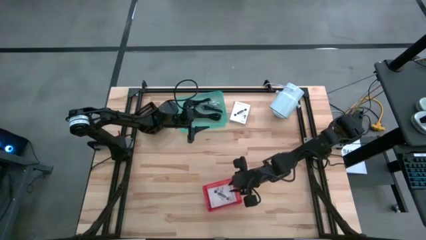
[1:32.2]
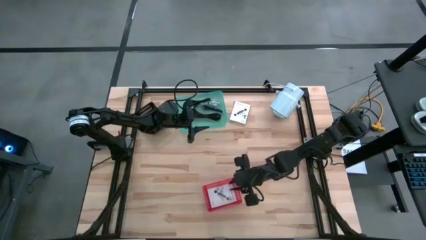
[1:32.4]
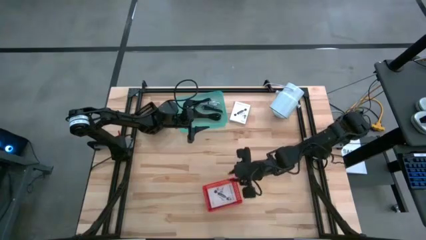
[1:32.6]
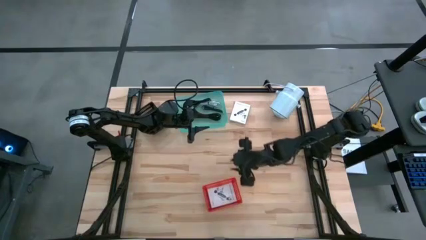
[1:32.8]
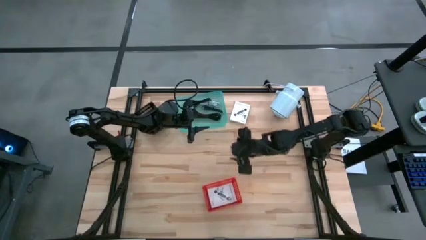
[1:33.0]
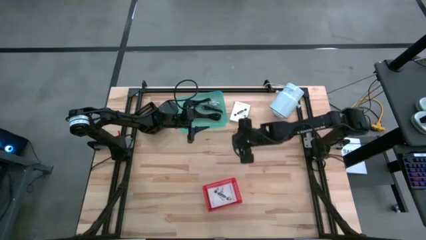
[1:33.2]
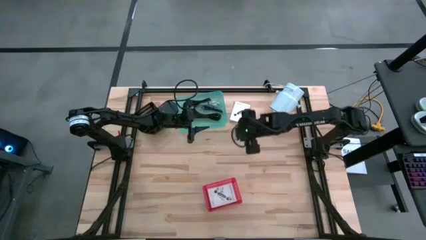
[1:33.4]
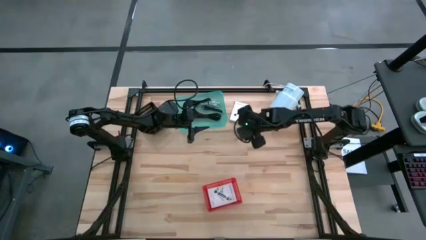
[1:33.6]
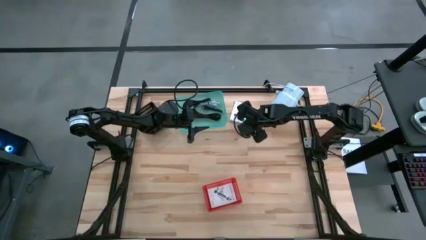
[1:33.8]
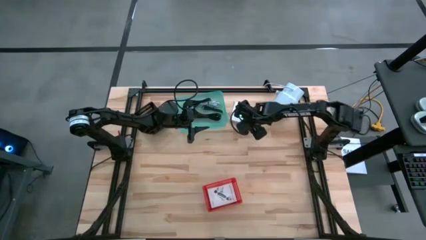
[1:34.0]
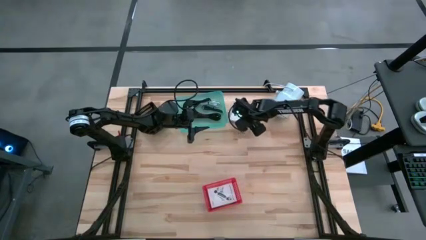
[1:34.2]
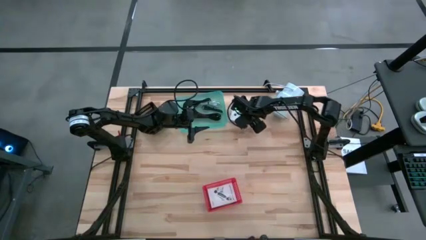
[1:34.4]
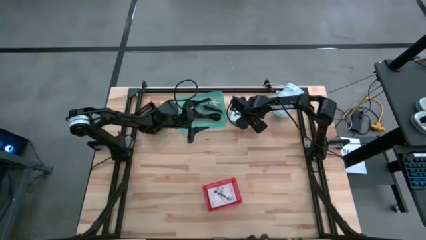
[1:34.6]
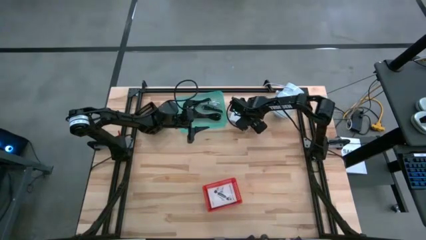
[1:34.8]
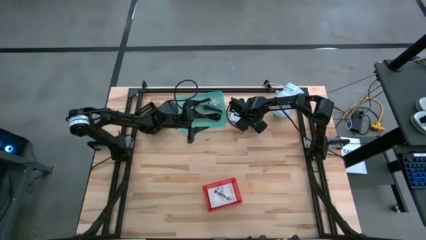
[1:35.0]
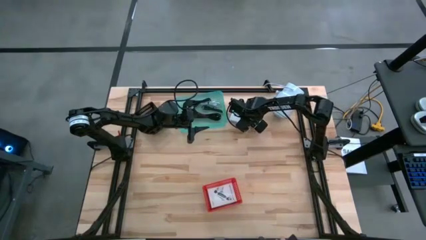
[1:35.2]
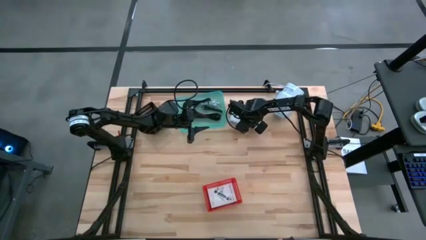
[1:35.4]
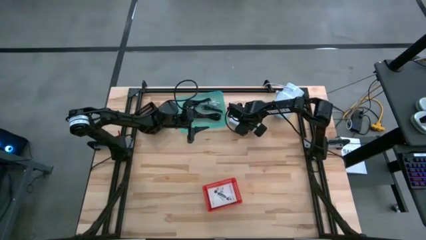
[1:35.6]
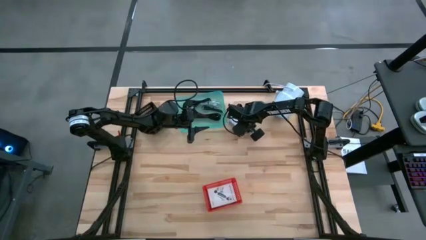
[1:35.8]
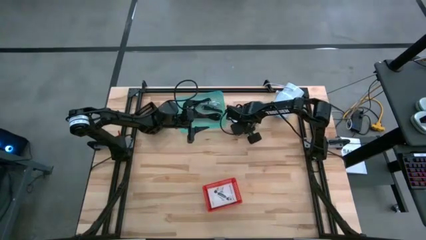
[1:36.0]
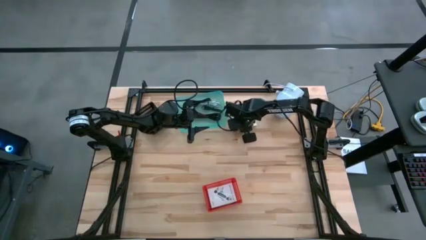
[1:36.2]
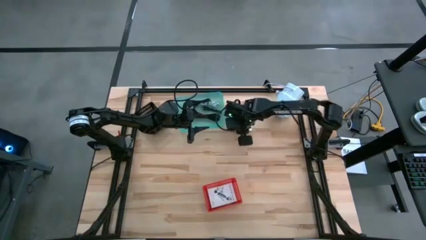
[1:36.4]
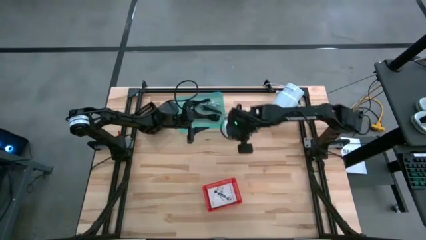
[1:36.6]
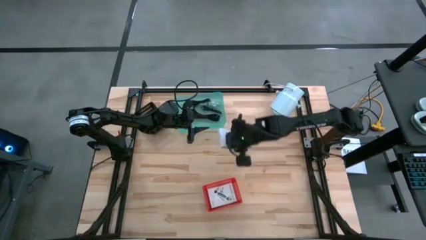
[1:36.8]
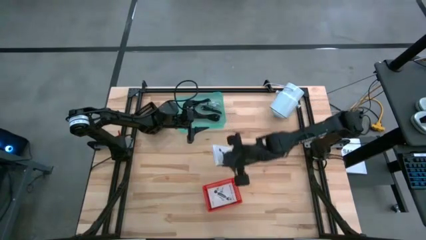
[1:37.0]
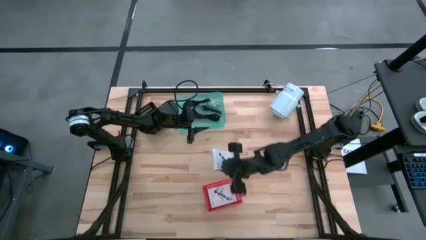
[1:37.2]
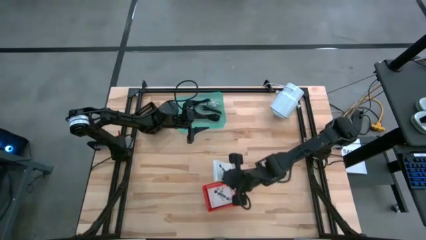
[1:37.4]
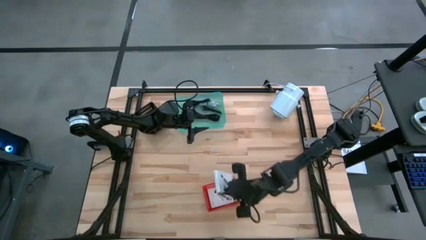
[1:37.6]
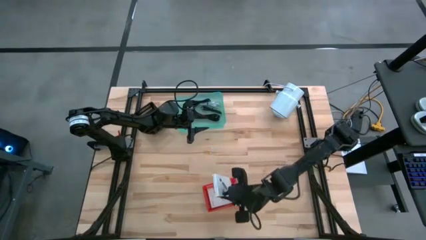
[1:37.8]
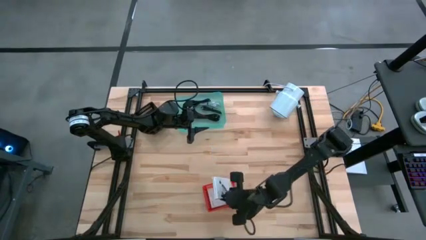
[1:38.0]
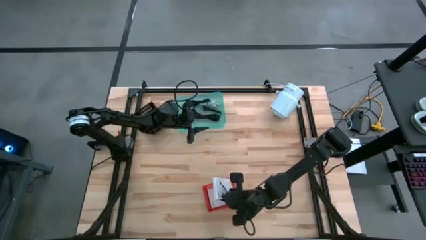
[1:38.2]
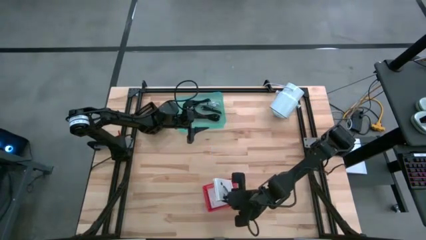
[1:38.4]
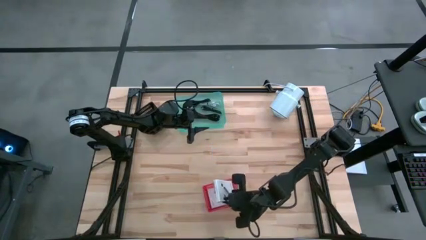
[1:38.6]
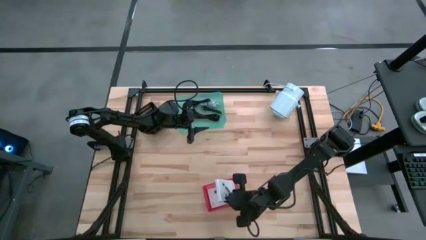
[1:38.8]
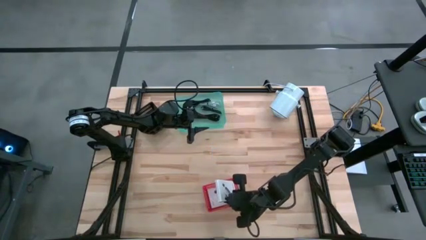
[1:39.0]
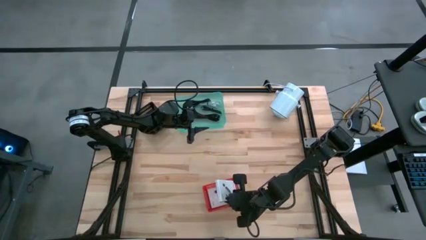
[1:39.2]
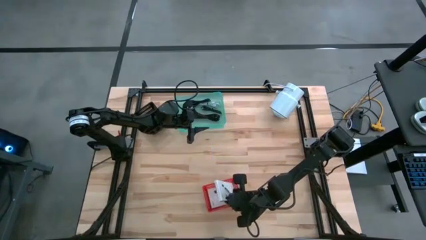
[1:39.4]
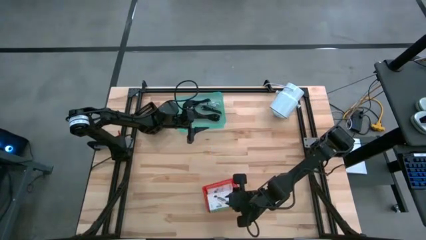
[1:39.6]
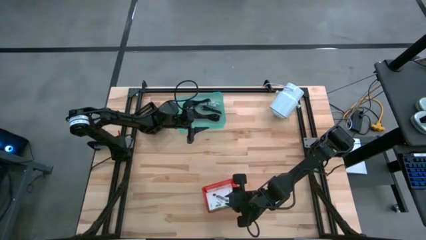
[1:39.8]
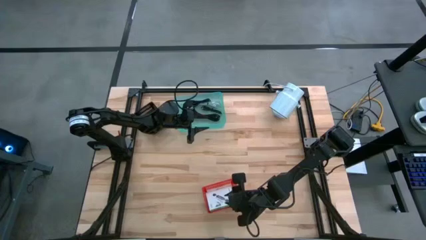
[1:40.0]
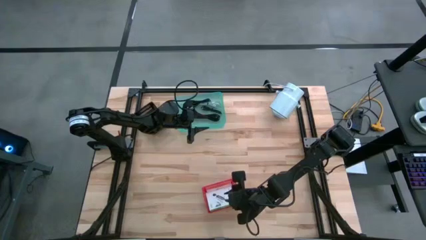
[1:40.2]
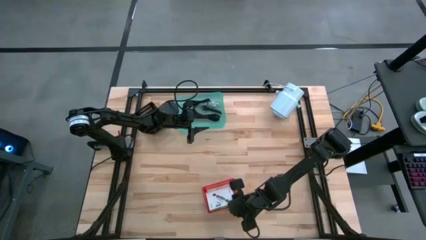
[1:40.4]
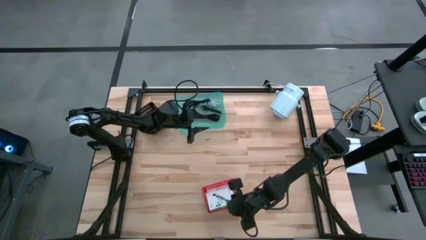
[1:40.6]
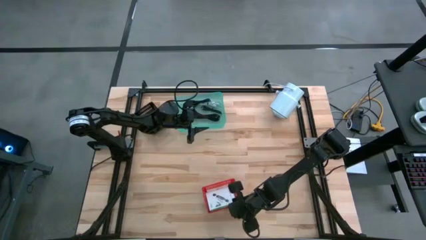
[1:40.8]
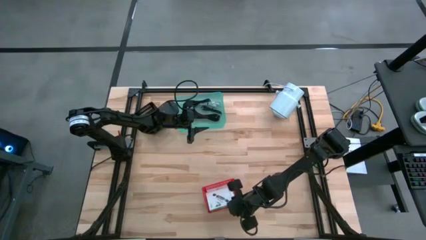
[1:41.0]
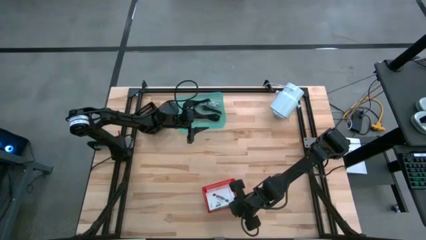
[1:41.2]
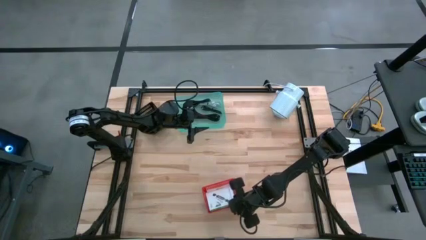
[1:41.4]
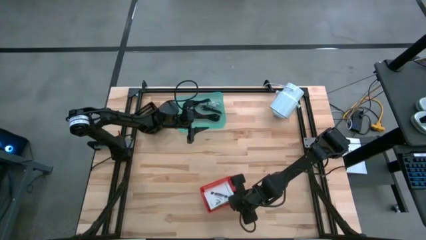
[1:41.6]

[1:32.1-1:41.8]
Task: Pick and place items into bin
Put the white card reader box into the red bin

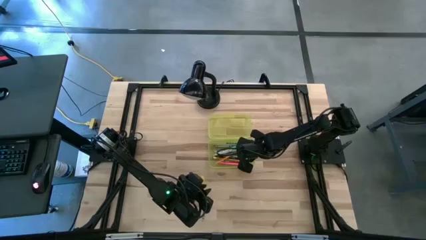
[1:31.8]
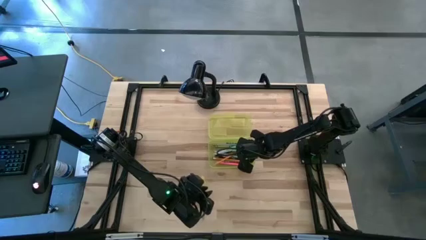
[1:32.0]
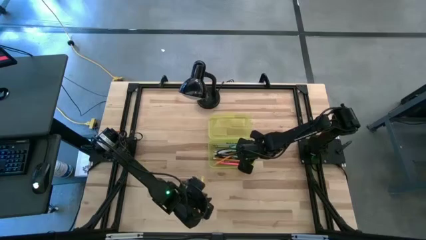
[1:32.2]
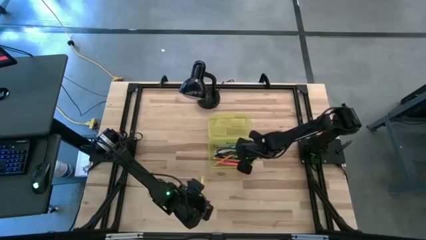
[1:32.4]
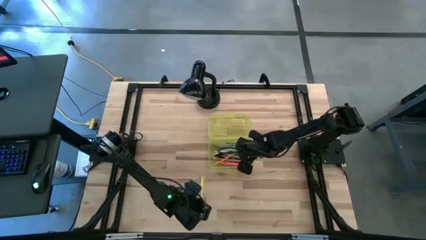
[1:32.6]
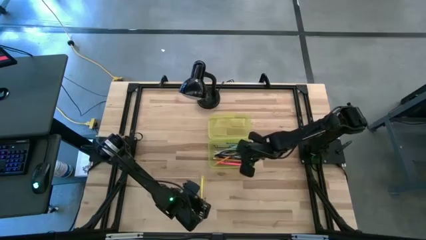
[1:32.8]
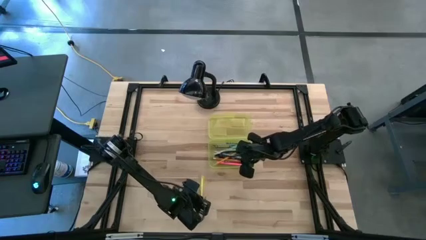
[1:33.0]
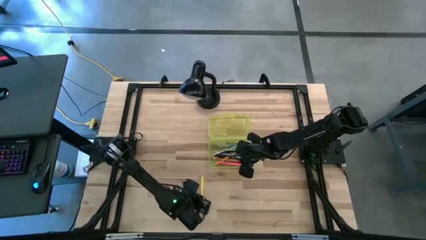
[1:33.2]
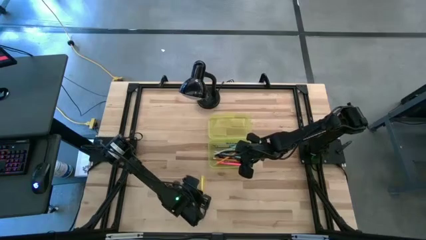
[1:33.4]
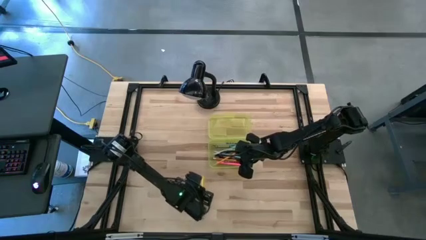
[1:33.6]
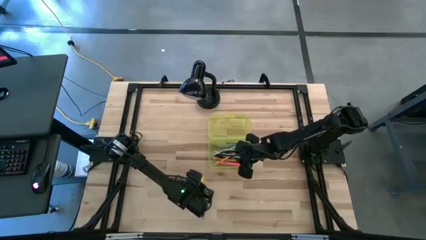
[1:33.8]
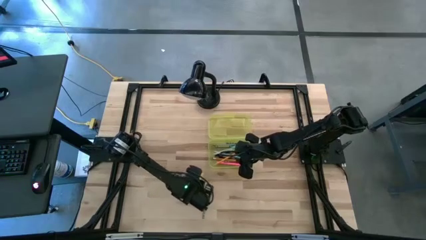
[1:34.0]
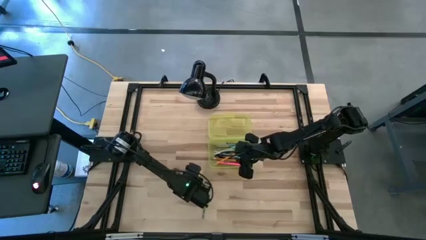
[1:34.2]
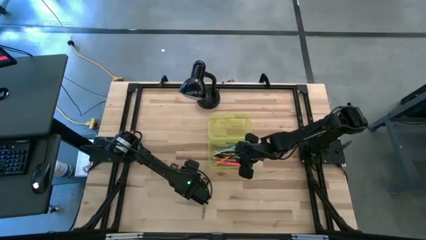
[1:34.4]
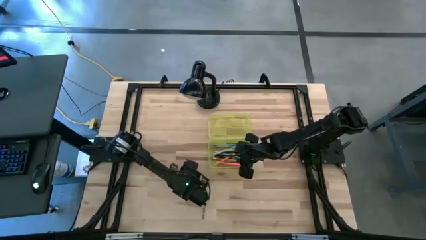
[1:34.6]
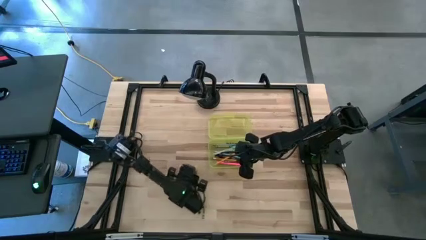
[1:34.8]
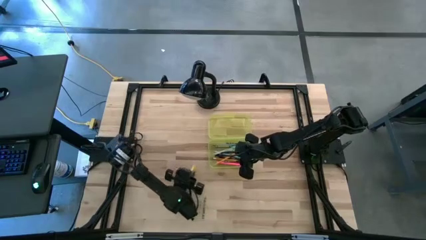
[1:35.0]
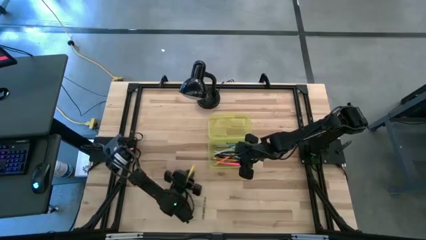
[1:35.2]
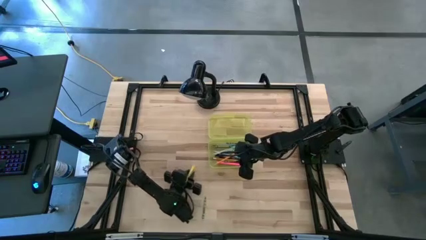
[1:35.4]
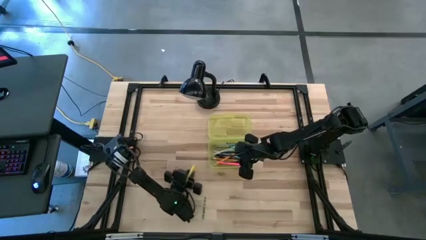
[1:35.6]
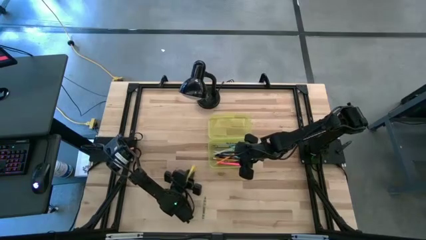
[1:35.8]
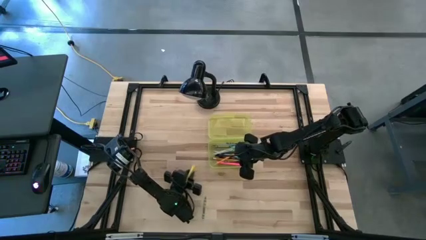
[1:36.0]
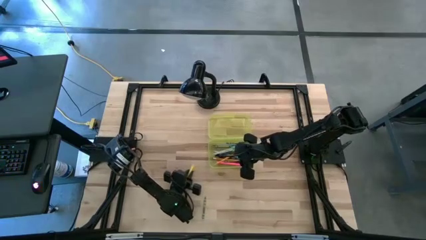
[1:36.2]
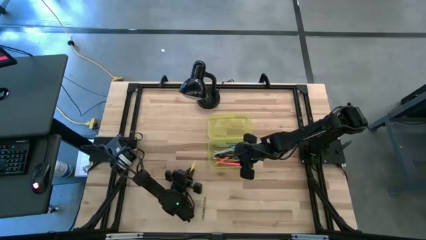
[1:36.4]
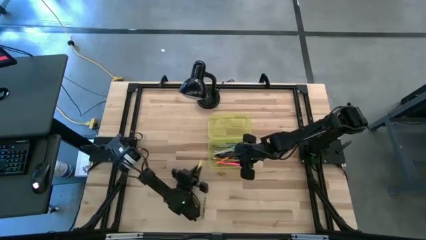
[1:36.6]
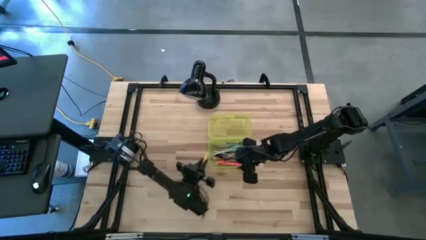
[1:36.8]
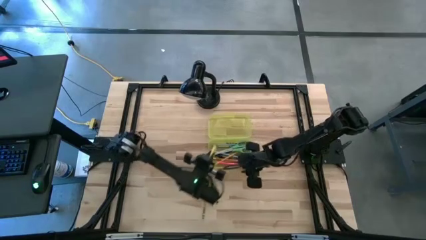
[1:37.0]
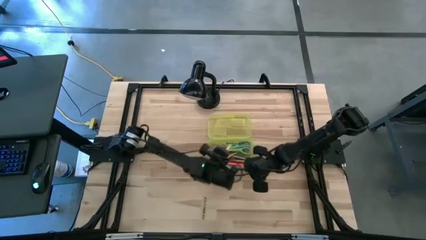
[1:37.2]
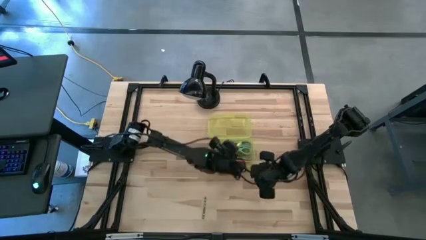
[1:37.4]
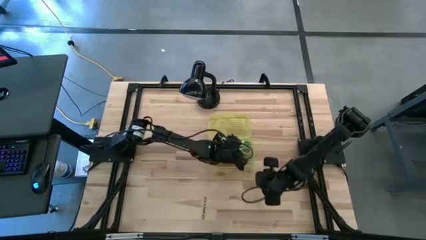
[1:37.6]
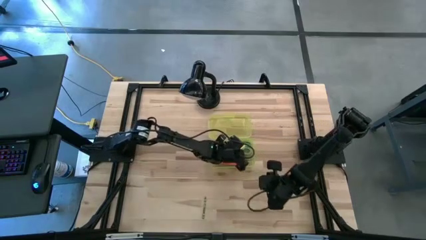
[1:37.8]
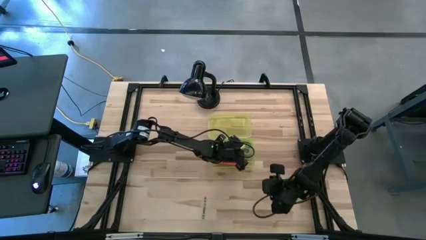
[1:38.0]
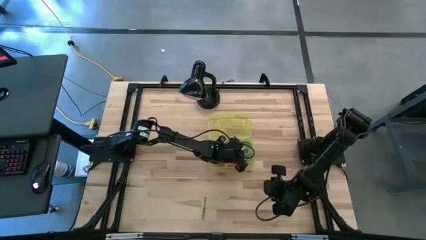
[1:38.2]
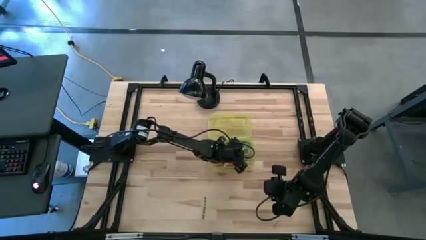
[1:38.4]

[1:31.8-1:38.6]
Task: Pick & place school supplies into a supply box
Put the yellow pen into the yellow supply box
